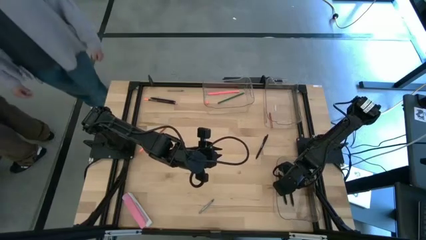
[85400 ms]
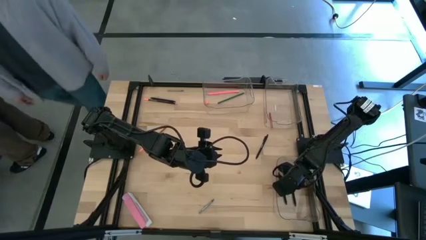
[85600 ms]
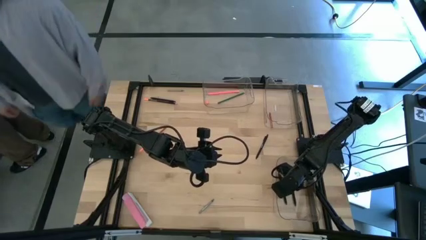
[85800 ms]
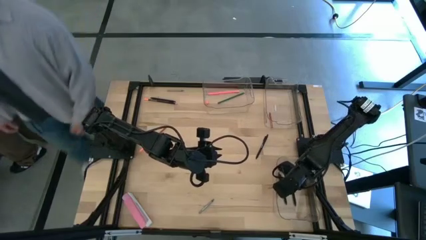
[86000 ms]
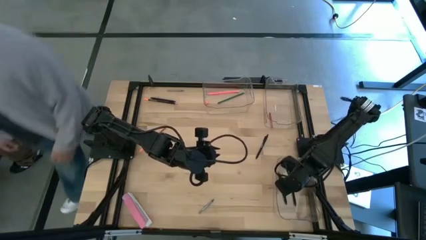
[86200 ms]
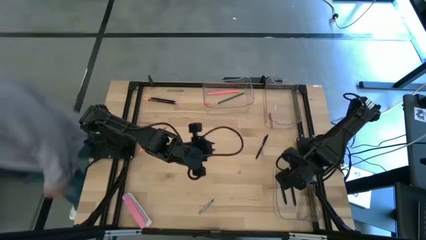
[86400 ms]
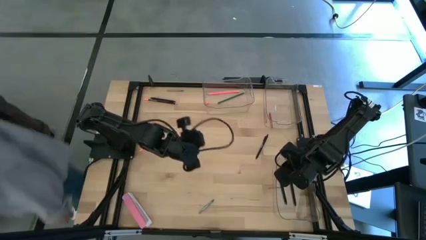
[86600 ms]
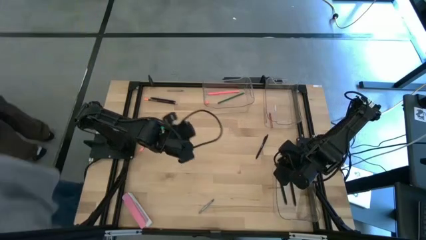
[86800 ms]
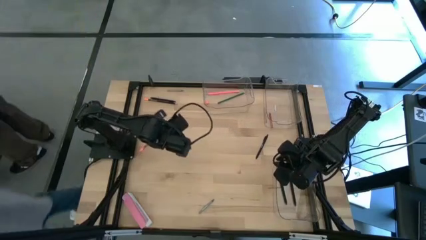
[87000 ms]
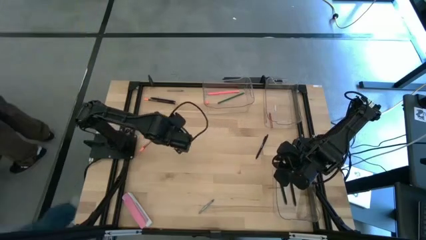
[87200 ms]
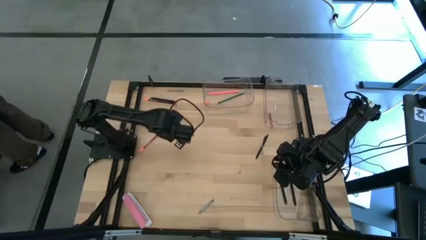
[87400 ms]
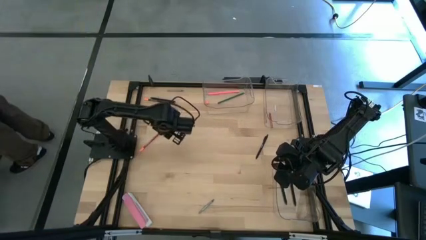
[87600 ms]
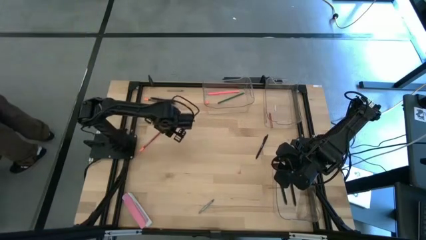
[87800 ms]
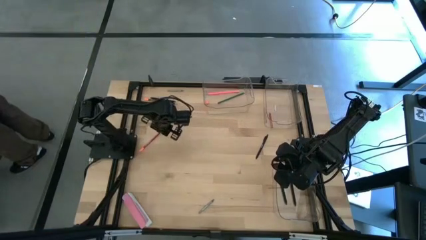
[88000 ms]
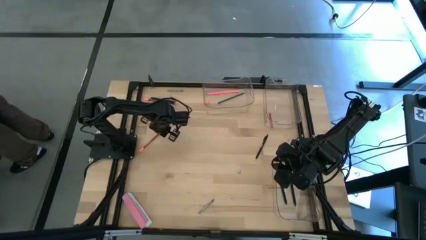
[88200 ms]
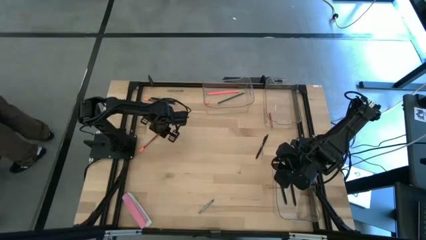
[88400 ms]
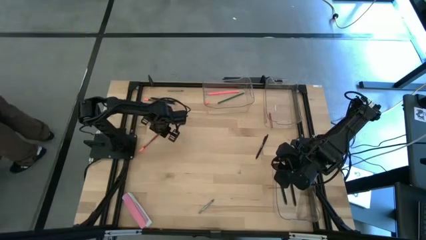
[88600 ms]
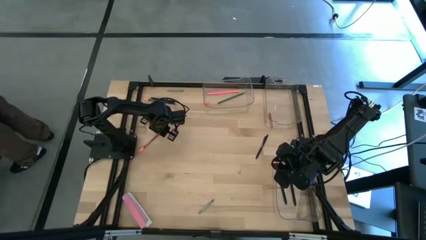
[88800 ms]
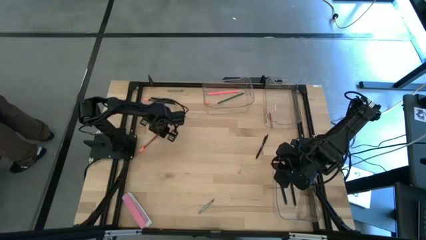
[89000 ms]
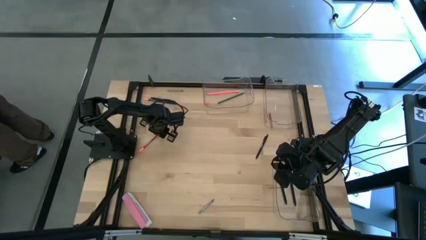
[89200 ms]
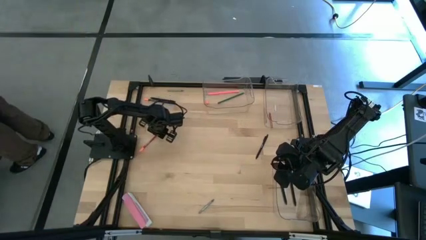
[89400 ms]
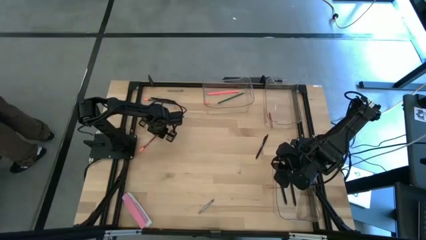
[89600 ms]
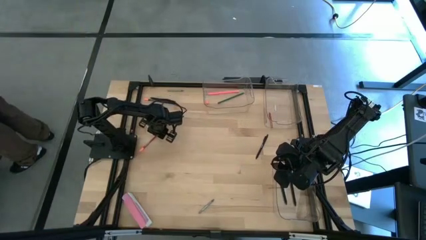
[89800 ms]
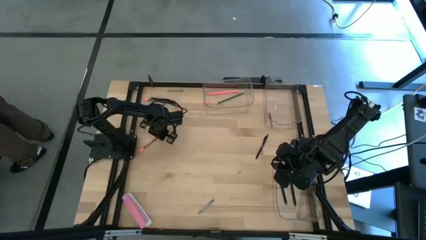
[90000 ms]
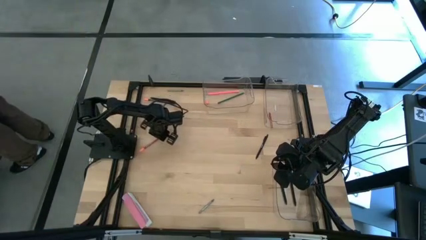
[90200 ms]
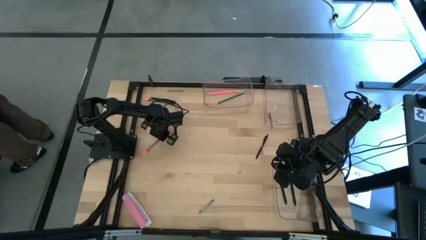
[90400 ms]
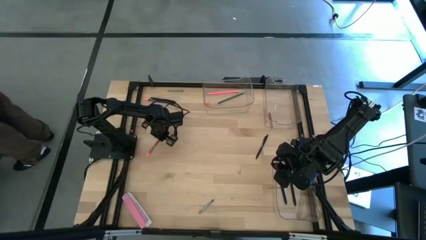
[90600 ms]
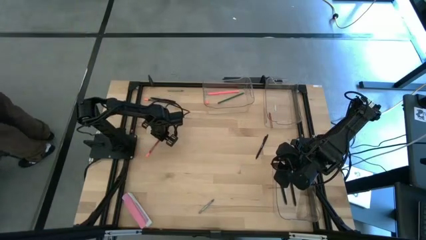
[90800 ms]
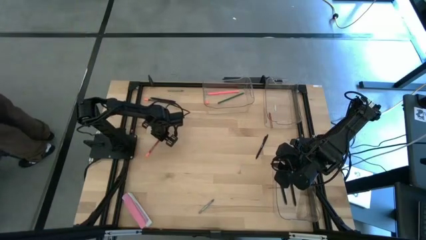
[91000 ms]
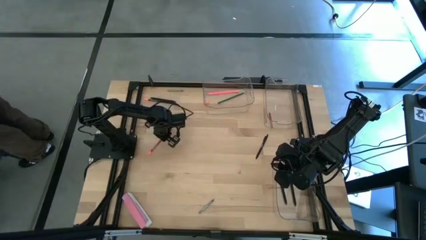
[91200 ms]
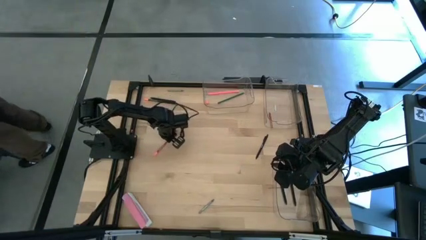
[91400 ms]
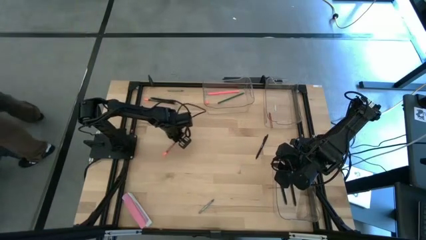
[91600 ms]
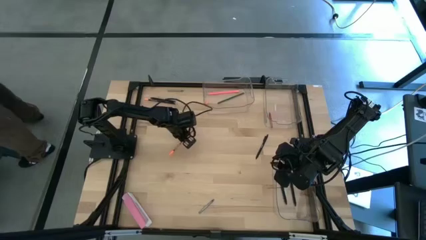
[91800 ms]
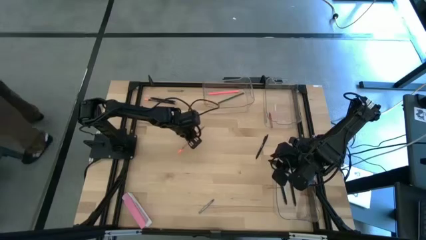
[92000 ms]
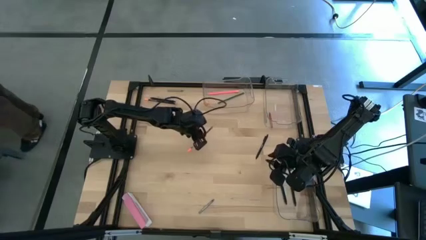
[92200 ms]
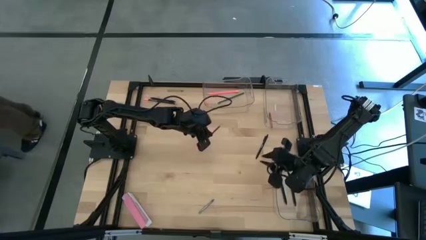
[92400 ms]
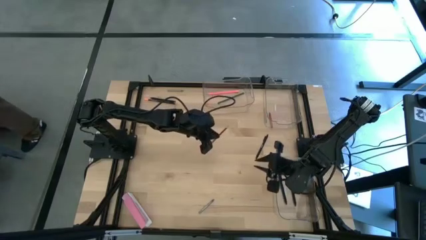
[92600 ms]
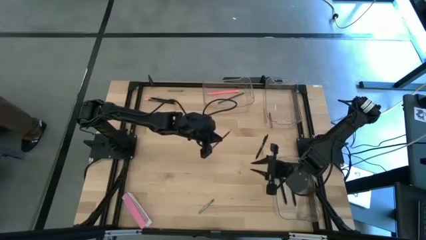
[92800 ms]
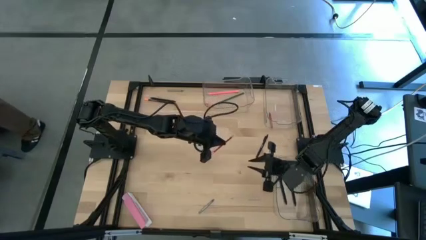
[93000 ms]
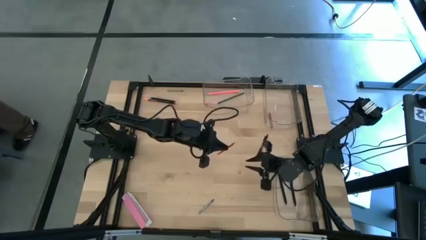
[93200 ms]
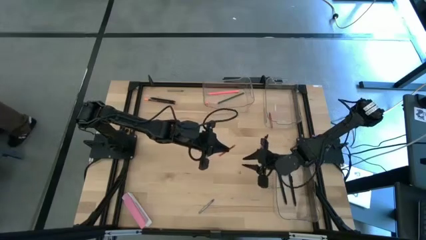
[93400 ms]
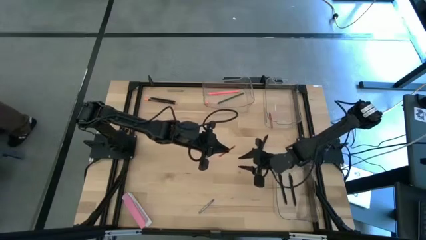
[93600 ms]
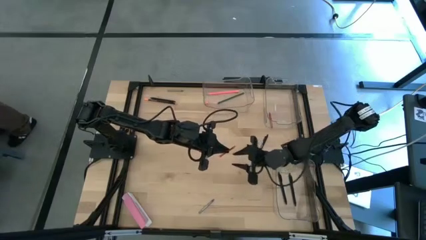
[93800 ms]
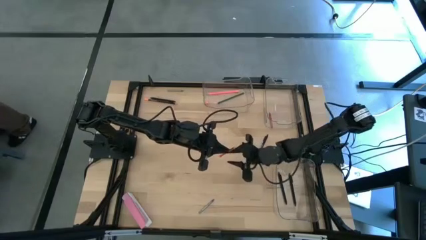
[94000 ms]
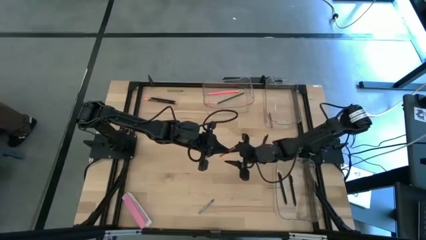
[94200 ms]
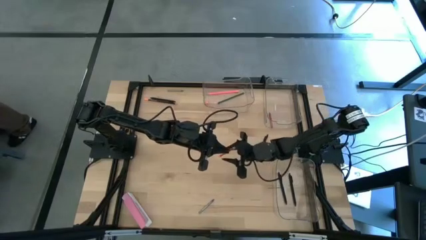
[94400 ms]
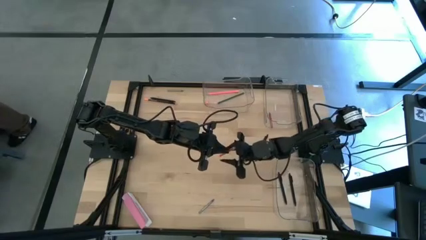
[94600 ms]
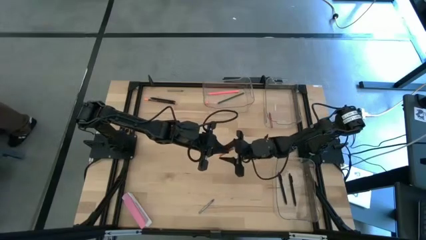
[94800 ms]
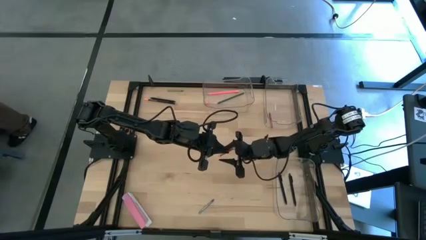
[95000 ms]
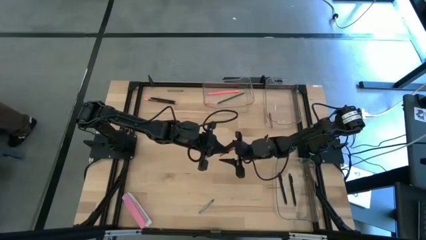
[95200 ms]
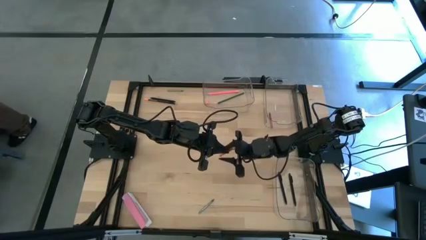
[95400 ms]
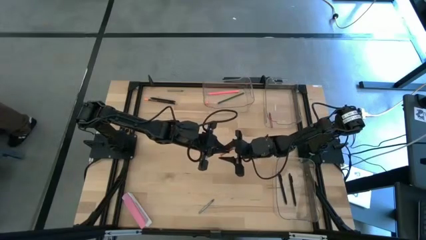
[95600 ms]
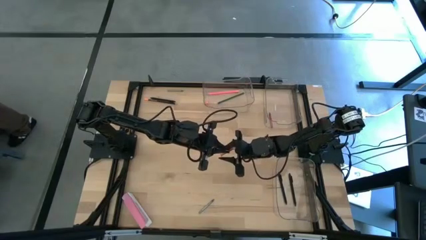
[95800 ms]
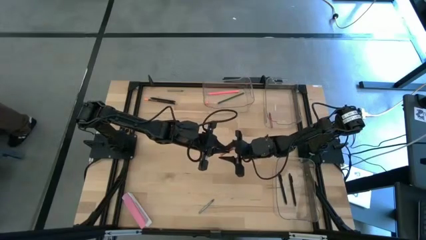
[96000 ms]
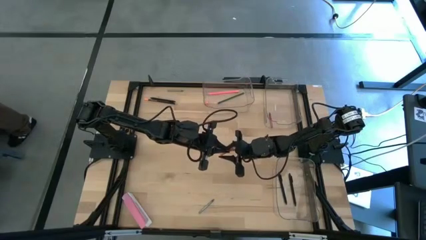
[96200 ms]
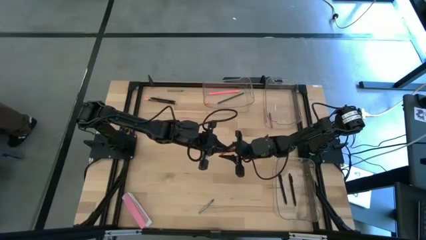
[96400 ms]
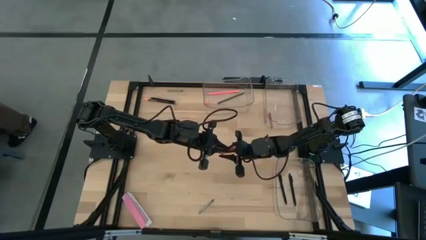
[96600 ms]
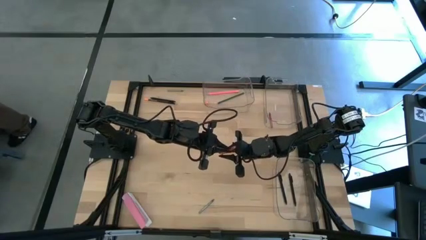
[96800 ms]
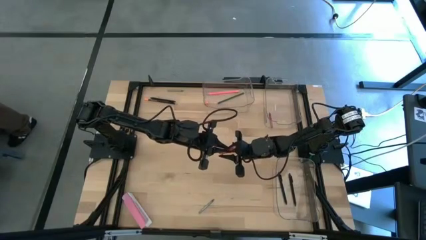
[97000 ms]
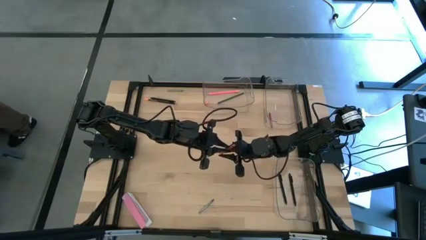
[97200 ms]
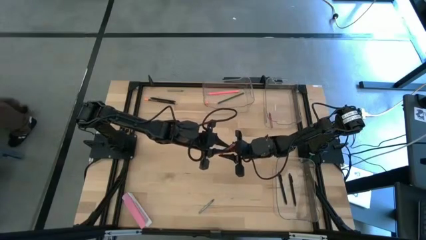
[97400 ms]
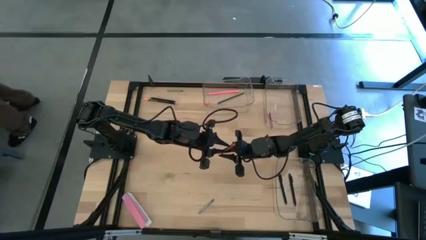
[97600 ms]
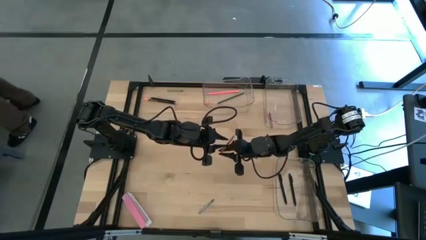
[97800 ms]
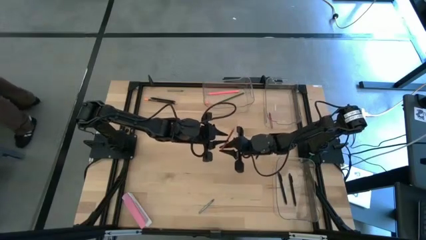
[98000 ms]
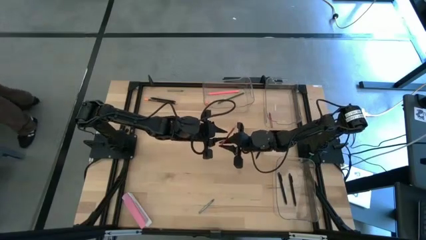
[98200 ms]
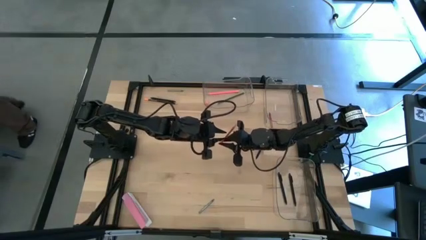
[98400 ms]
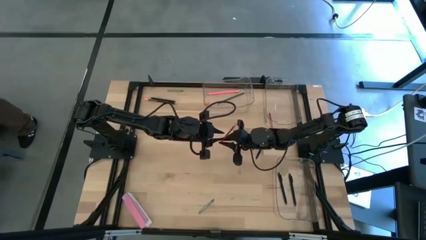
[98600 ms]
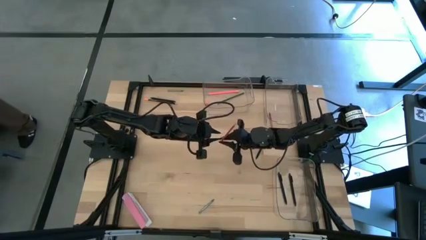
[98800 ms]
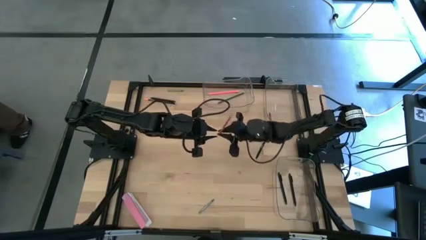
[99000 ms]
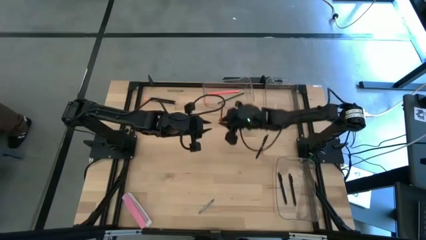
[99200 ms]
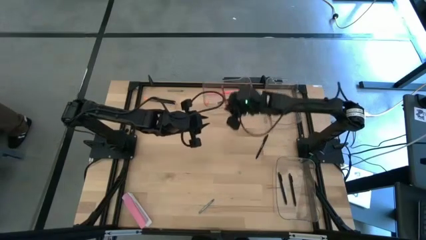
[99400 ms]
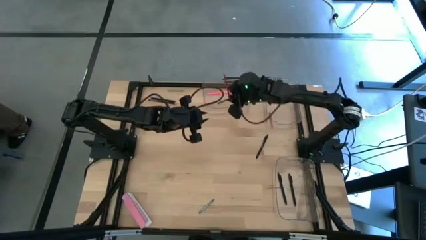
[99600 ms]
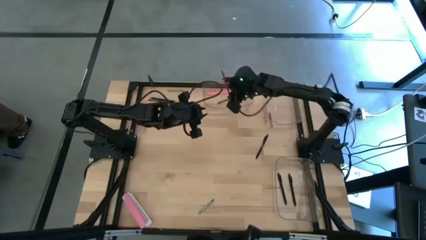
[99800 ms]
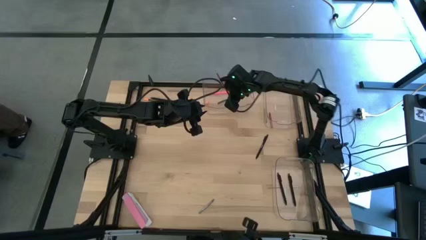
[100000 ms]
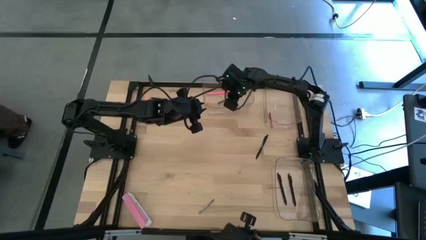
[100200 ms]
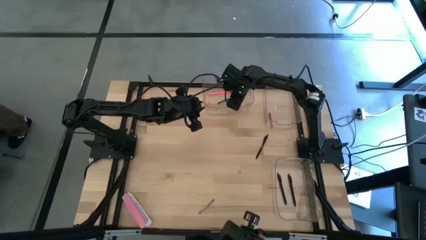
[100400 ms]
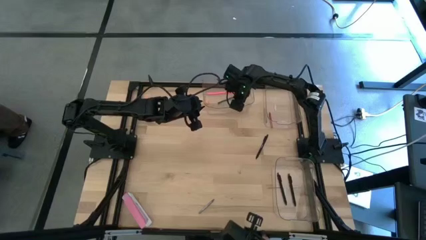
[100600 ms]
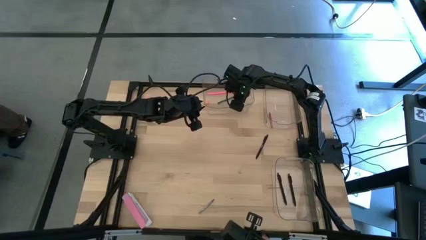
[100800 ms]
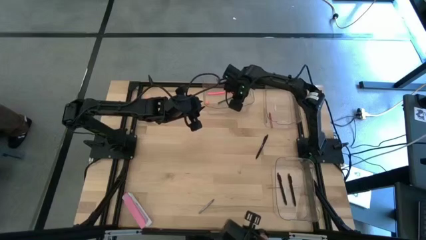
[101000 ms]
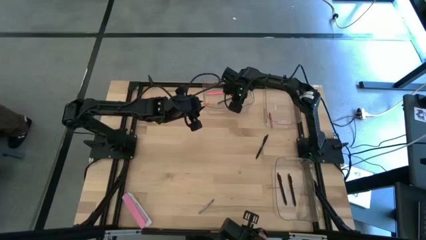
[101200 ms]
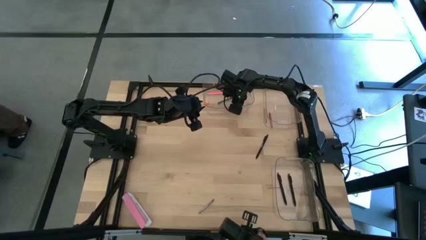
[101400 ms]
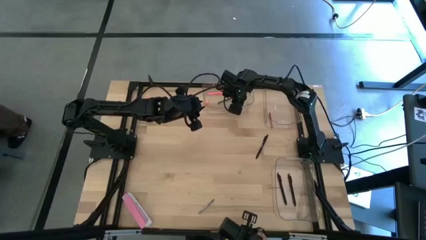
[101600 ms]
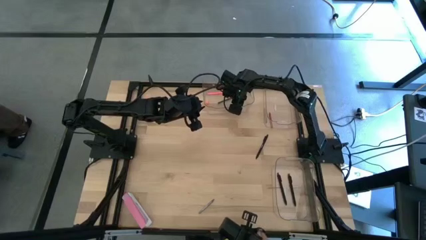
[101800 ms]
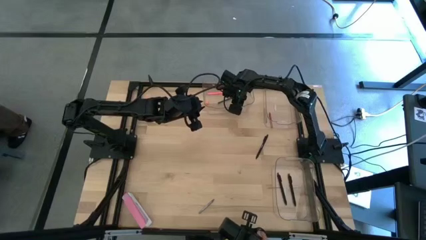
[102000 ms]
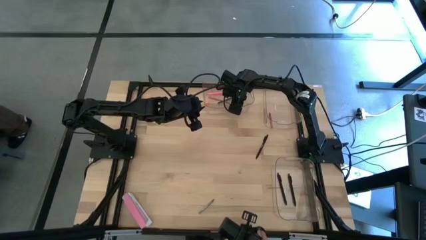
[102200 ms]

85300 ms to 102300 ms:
Task: Sort crayons/erasers/pens/pencils in bins
Put the red pencil into the top left transparent bin
